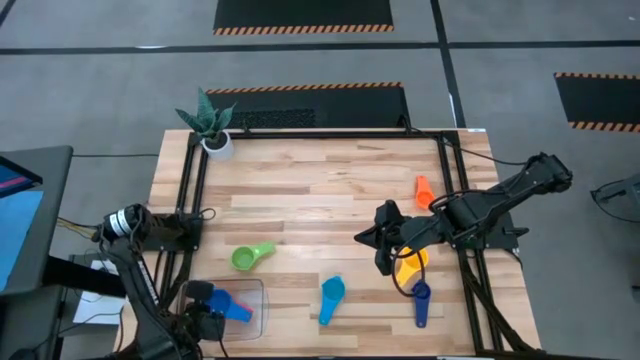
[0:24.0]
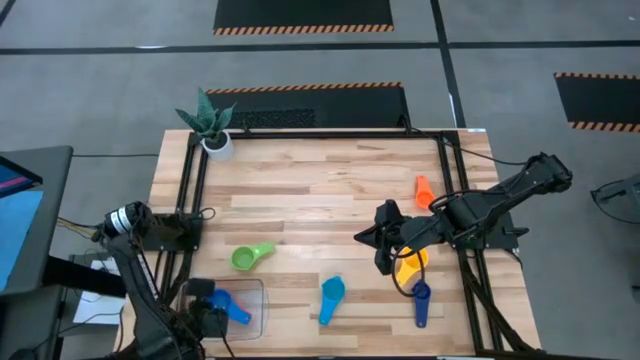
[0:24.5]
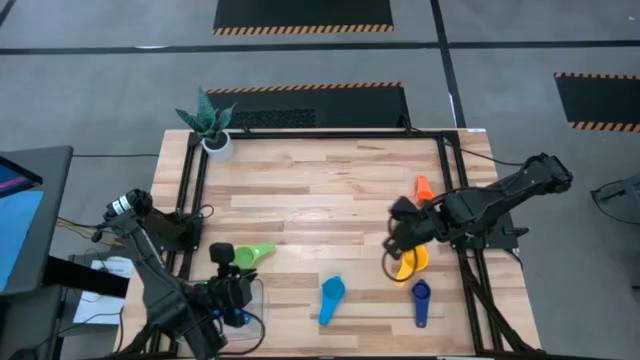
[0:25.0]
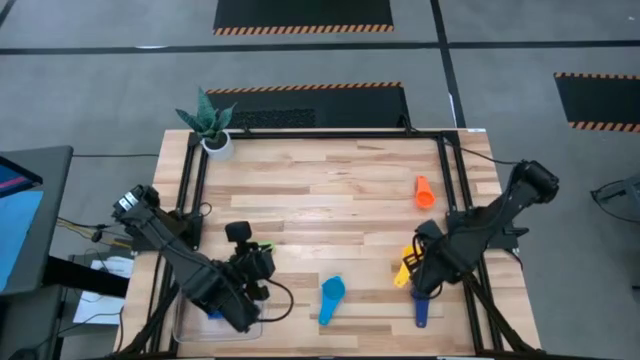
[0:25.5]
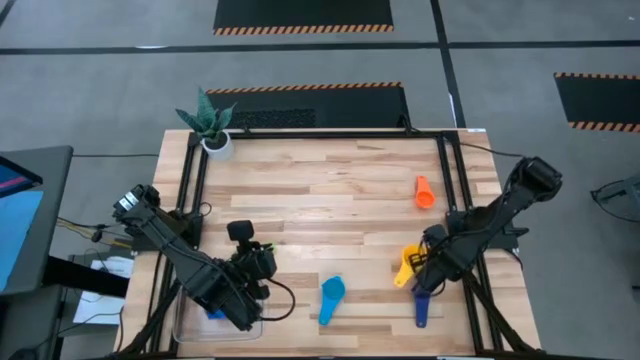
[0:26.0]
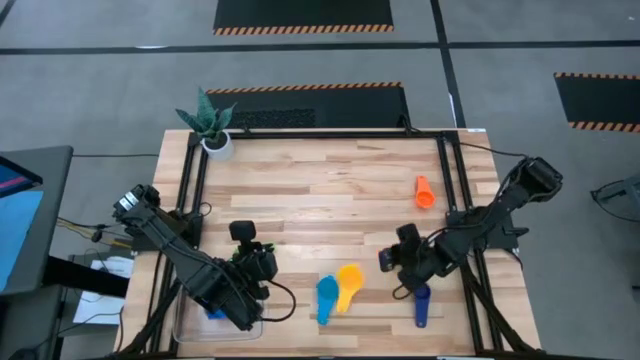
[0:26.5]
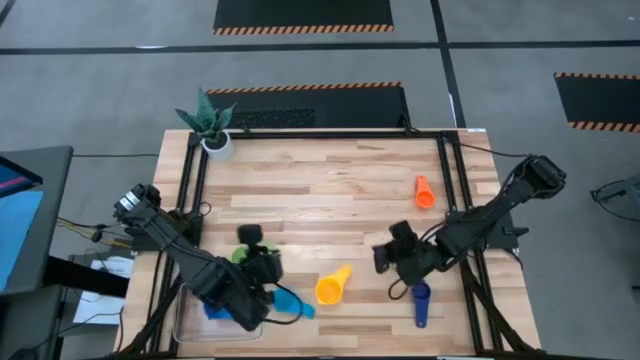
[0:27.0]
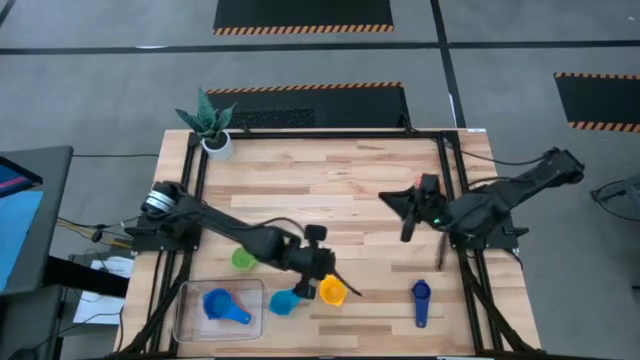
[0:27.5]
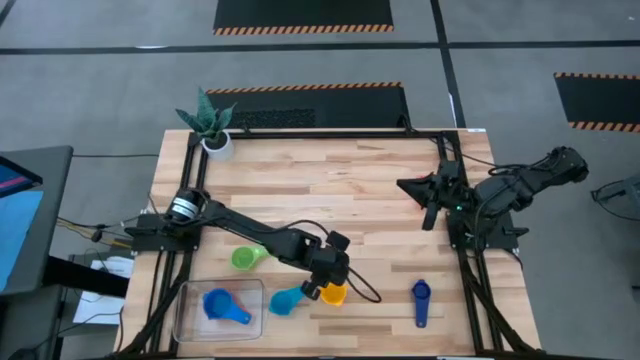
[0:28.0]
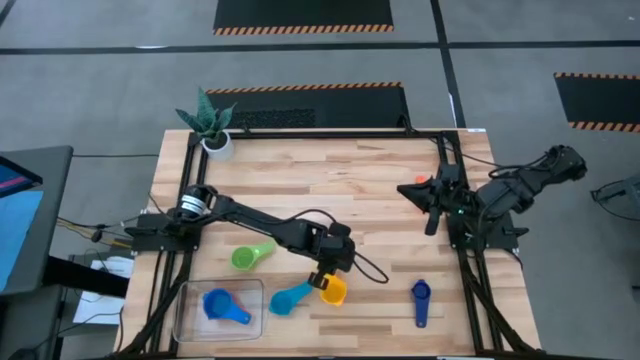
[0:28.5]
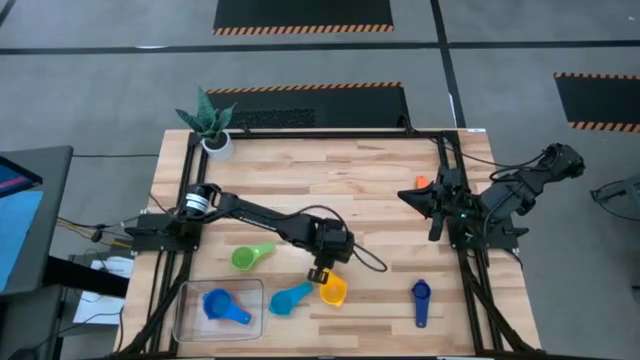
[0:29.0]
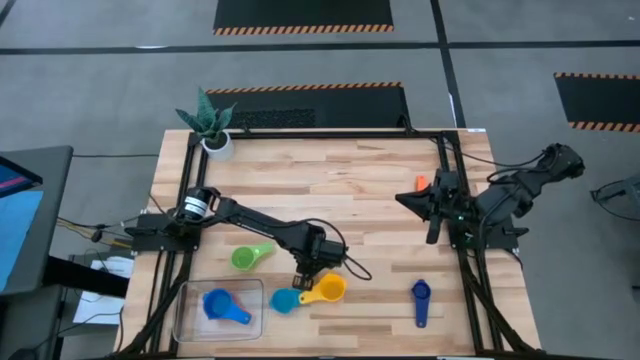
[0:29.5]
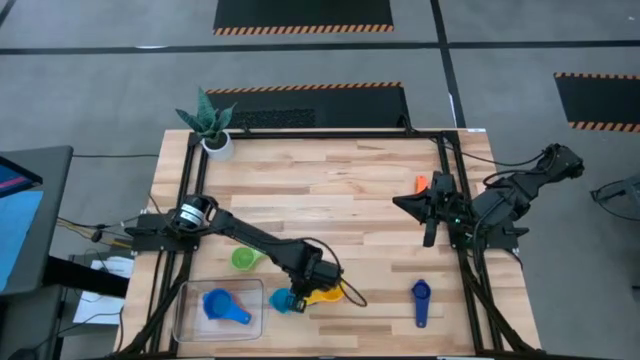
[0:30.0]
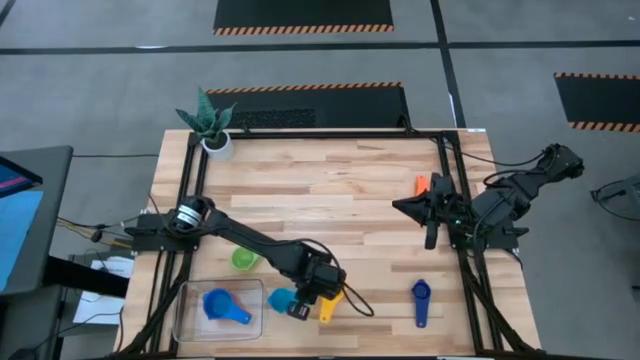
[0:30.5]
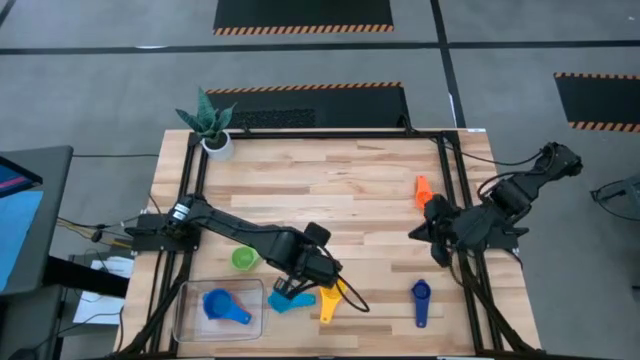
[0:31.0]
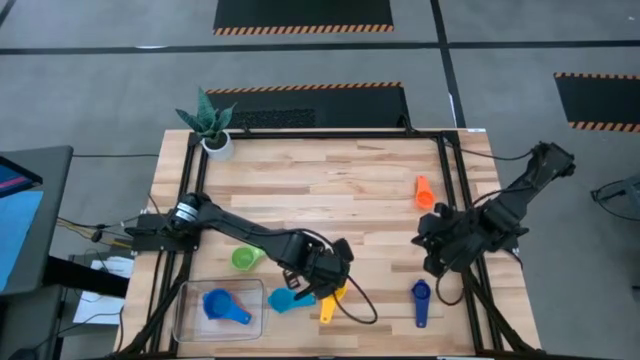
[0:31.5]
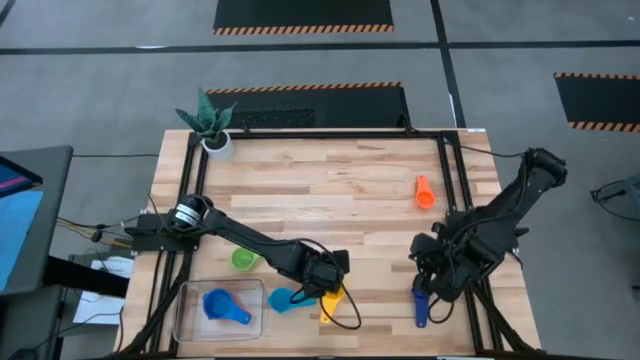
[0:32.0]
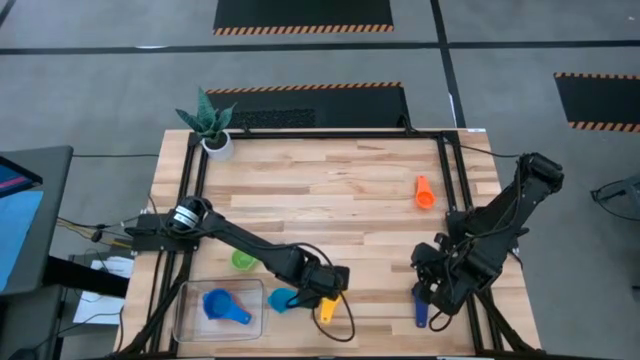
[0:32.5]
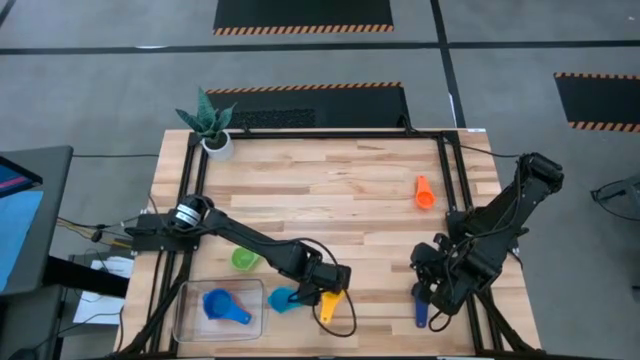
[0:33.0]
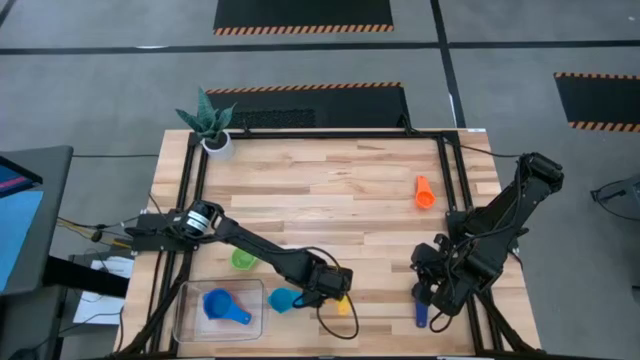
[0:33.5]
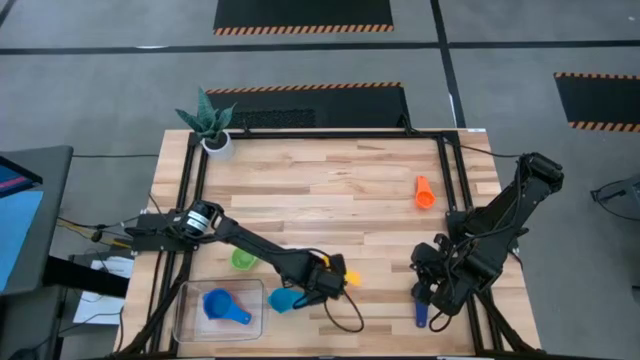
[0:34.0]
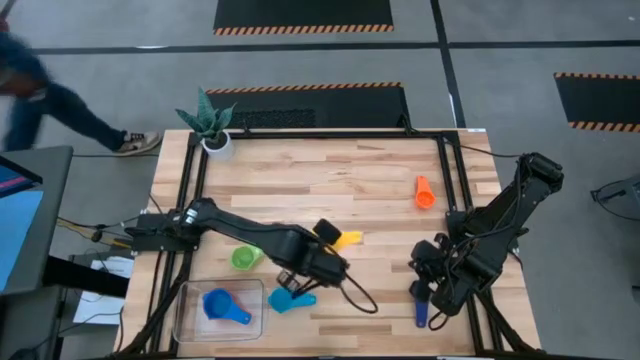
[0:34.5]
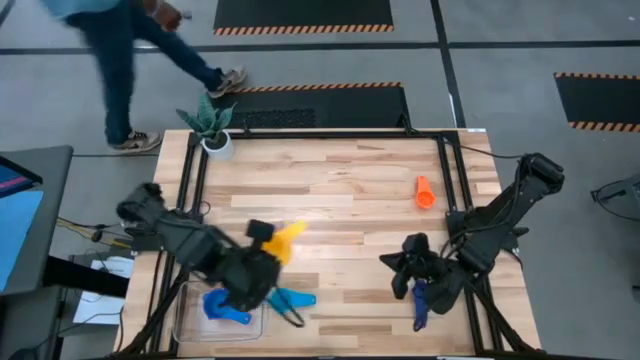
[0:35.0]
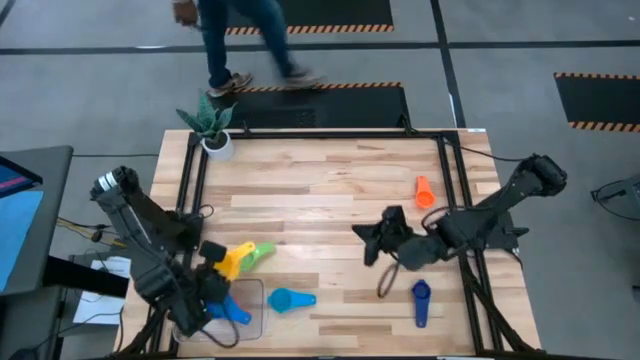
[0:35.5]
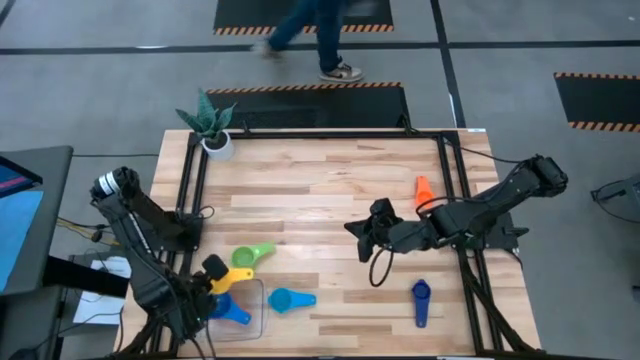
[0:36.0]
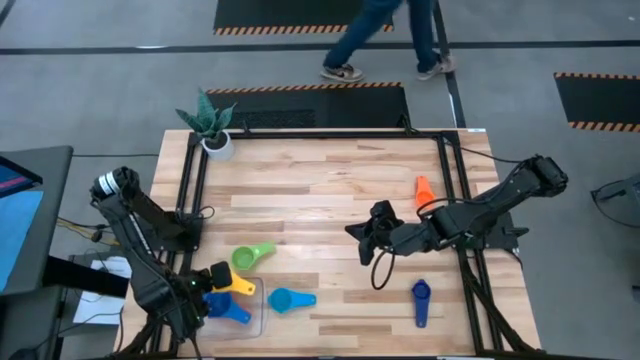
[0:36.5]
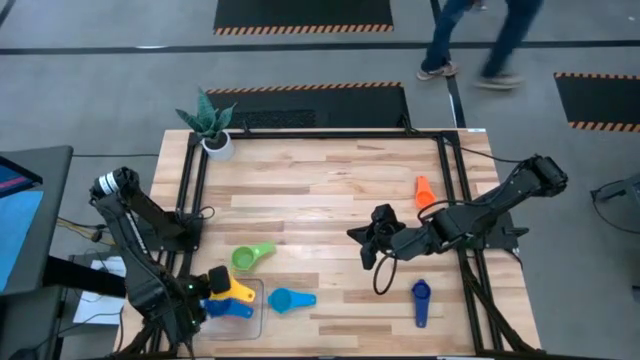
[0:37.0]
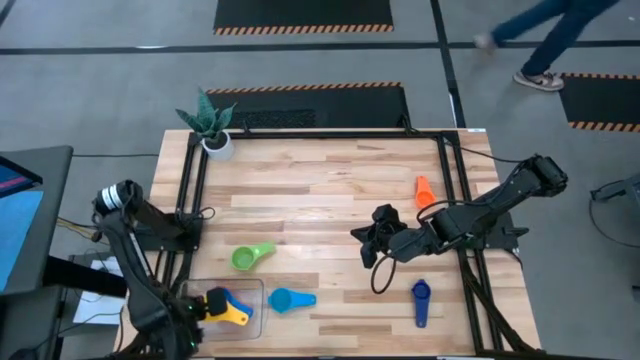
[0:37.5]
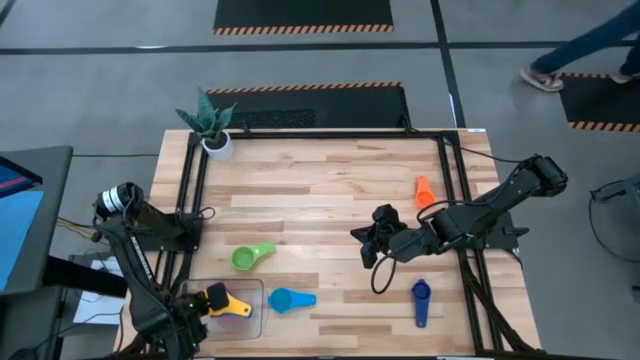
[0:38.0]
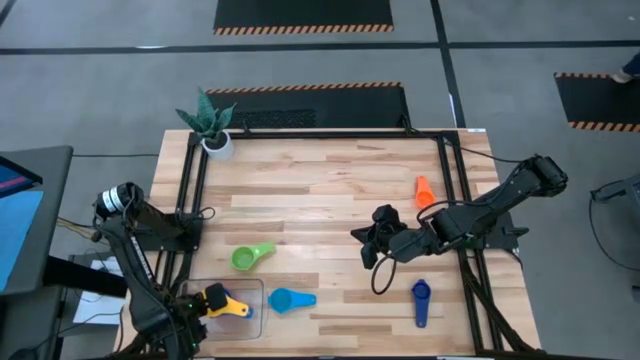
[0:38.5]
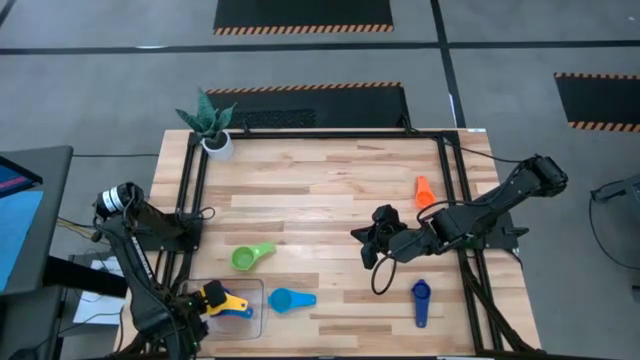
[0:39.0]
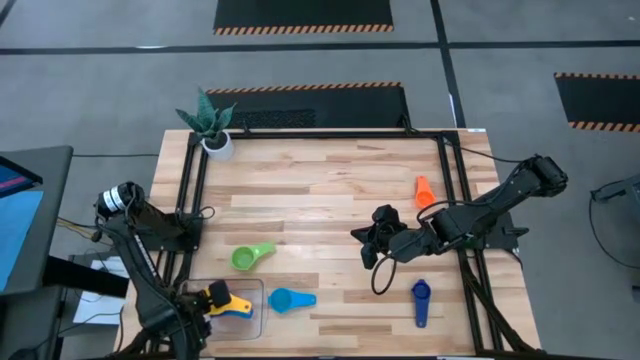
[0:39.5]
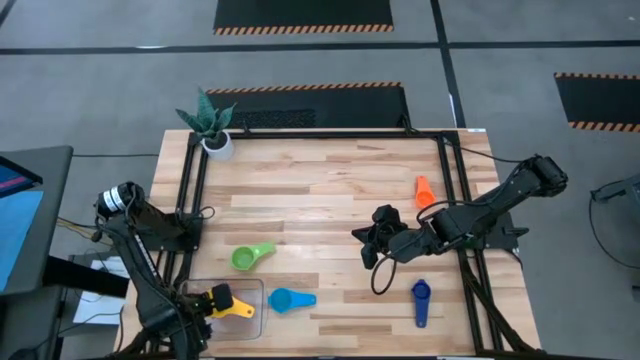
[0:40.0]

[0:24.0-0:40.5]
Task: Nest measuring cups in basket
Stack the yellow measuring cup on top of the blue measuring cup in the transparent bin

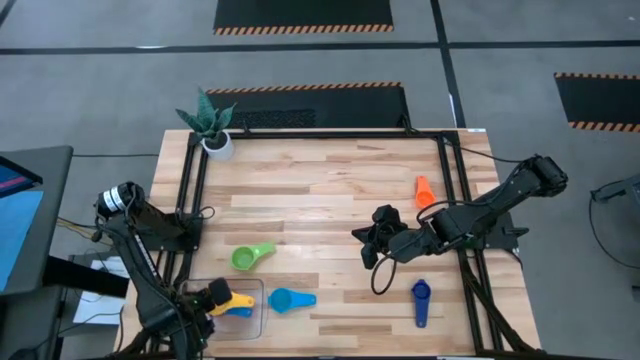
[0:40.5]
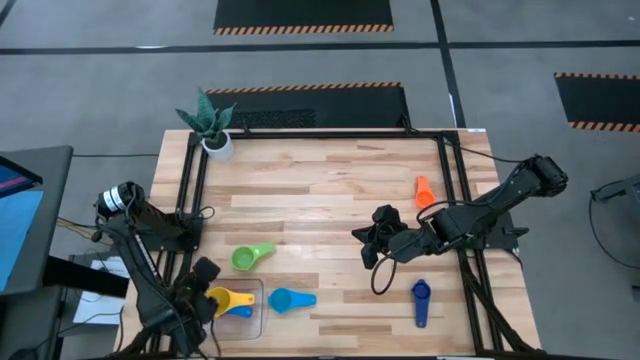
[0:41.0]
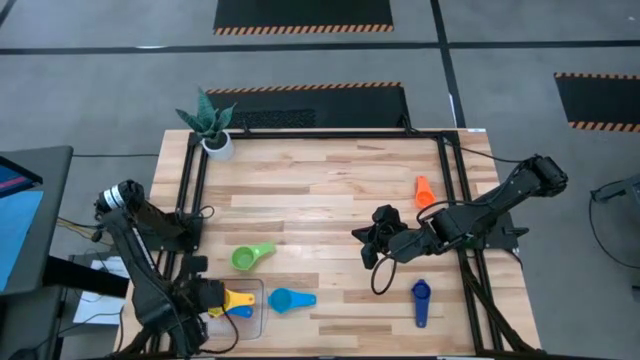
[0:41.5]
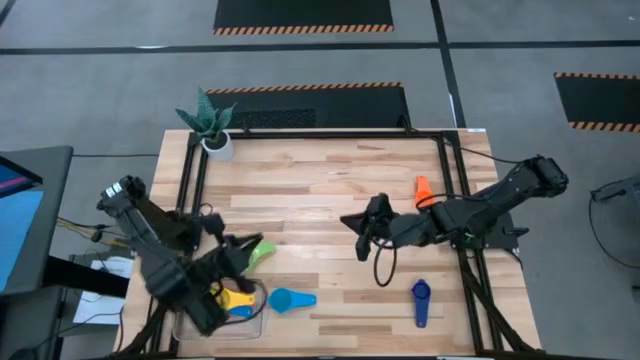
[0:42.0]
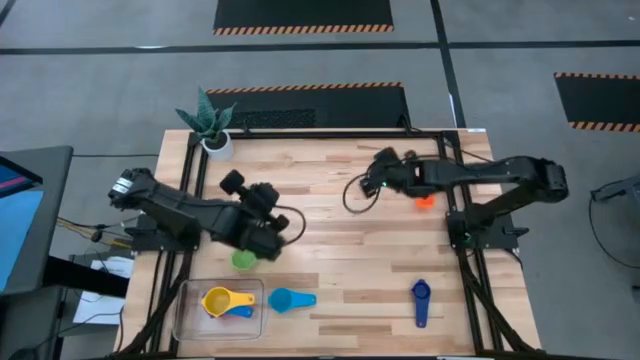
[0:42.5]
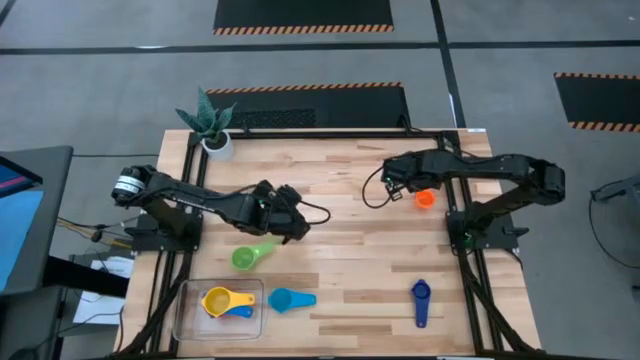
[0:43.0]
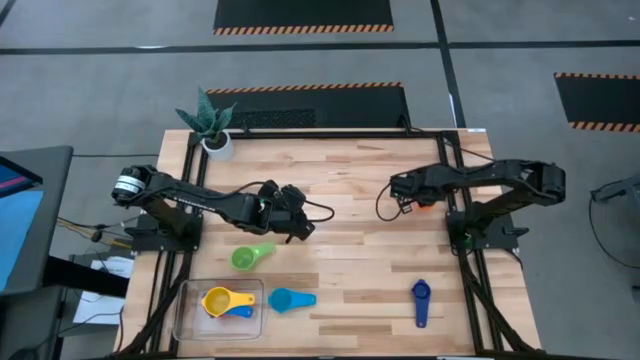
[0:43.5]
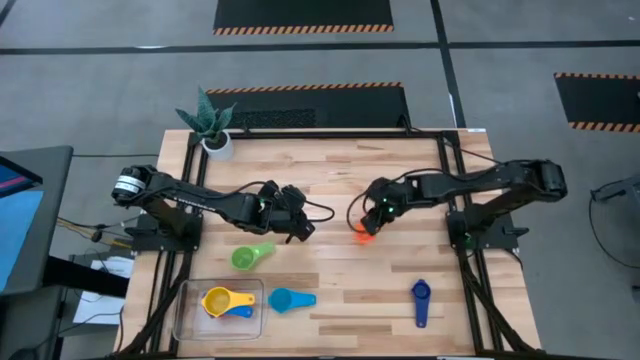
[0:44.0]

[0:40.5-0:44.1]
Move the orange measuring cup to the top center of the table
